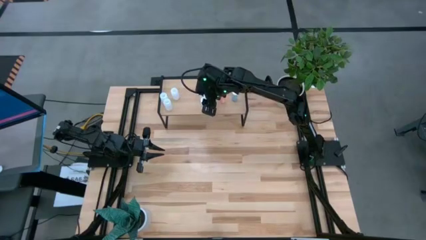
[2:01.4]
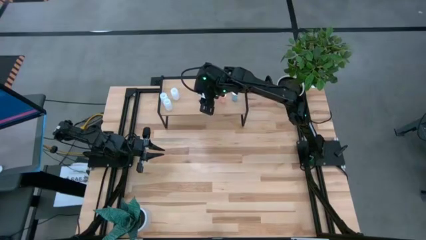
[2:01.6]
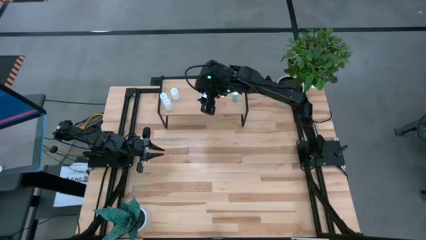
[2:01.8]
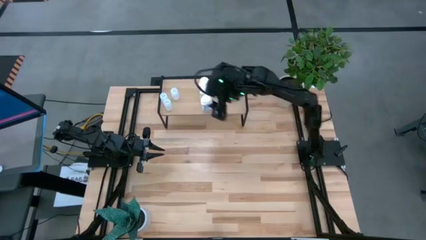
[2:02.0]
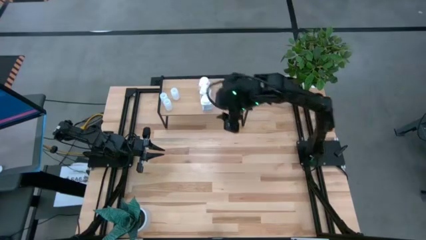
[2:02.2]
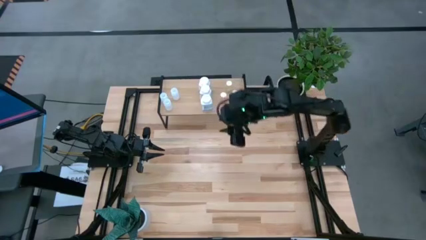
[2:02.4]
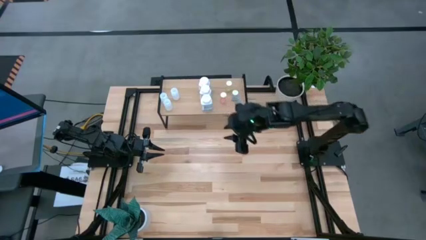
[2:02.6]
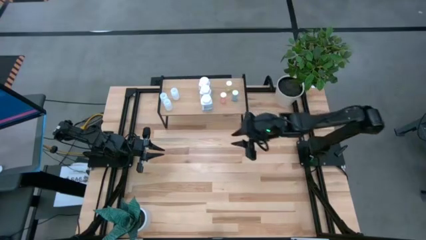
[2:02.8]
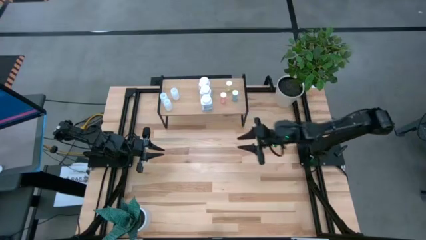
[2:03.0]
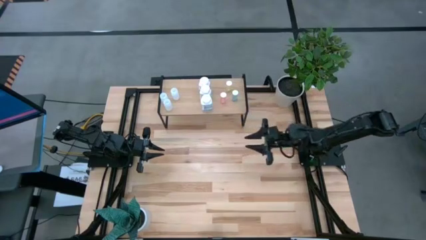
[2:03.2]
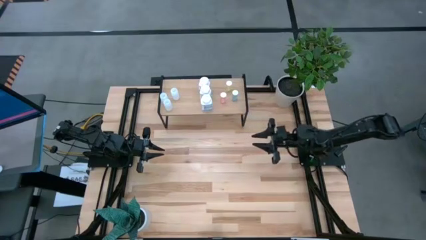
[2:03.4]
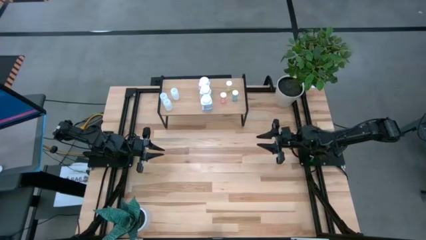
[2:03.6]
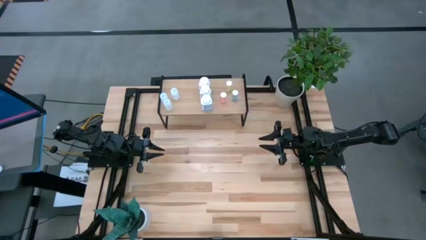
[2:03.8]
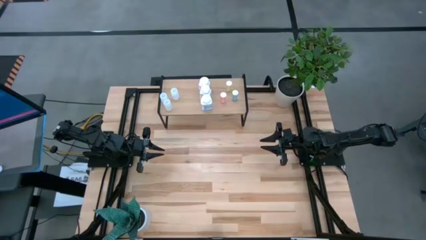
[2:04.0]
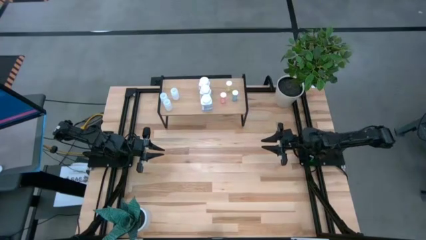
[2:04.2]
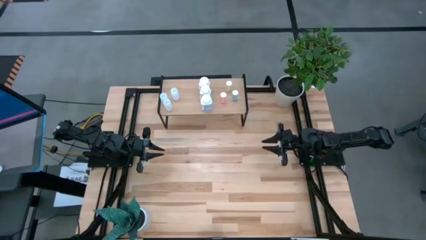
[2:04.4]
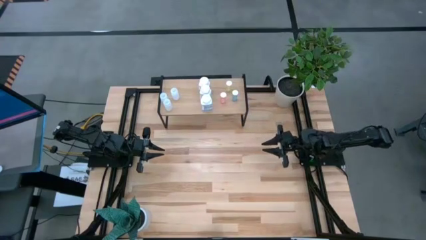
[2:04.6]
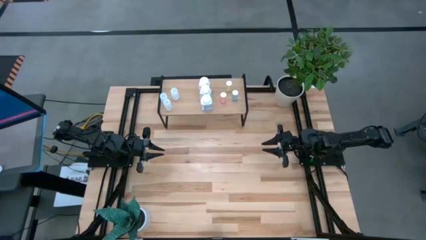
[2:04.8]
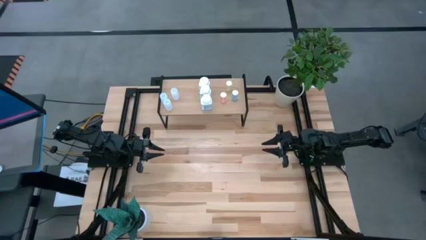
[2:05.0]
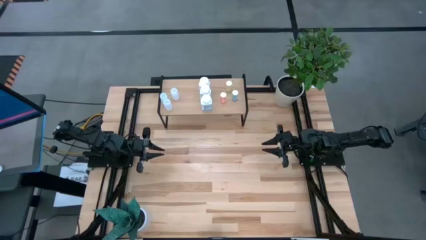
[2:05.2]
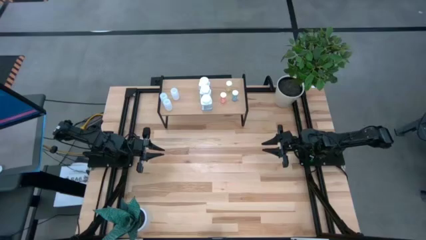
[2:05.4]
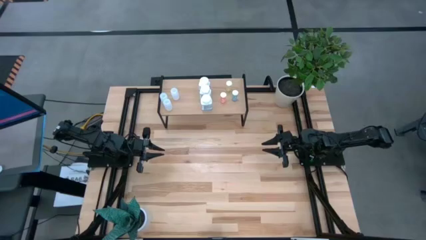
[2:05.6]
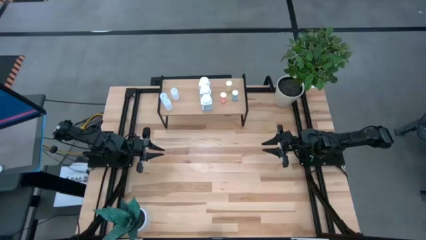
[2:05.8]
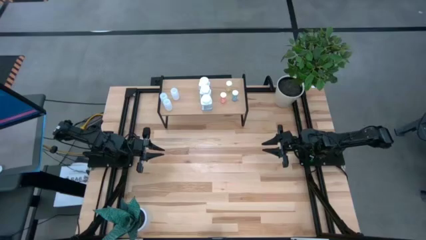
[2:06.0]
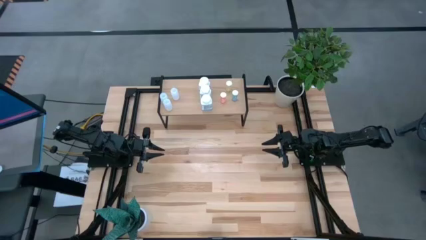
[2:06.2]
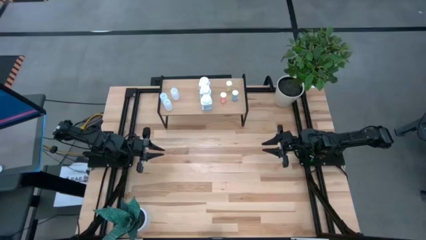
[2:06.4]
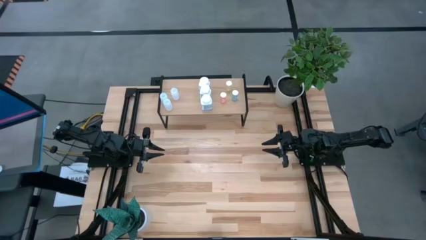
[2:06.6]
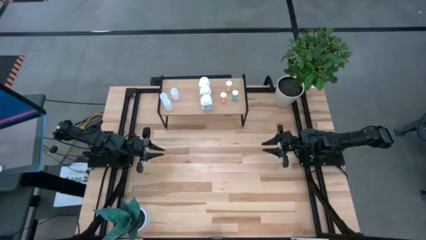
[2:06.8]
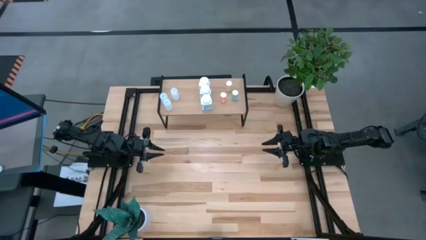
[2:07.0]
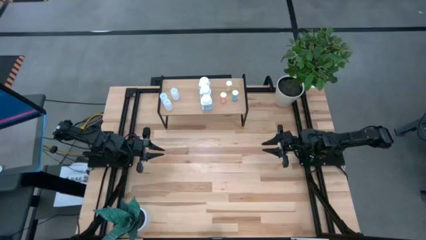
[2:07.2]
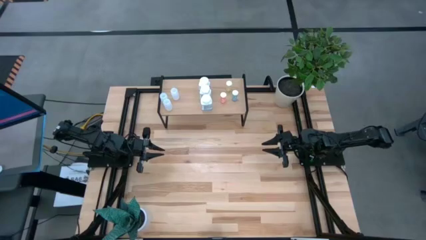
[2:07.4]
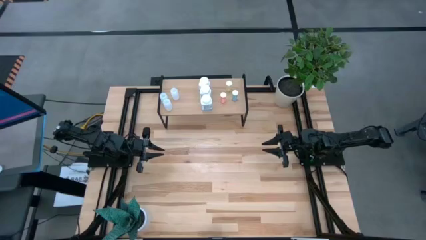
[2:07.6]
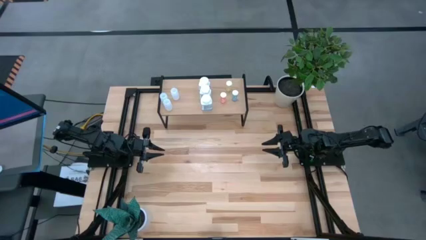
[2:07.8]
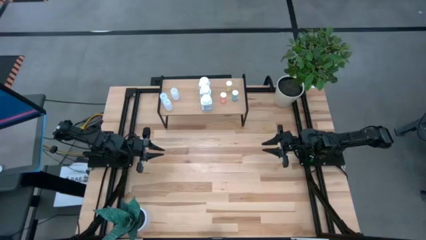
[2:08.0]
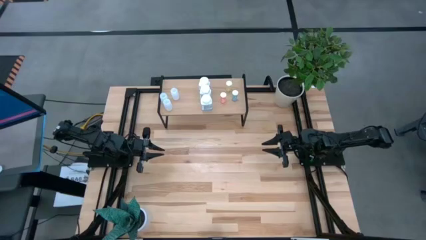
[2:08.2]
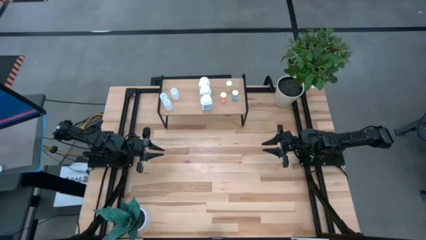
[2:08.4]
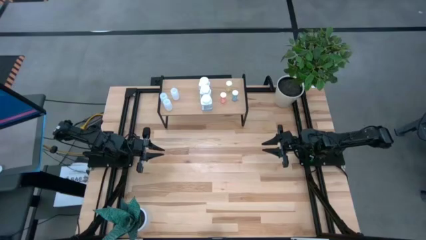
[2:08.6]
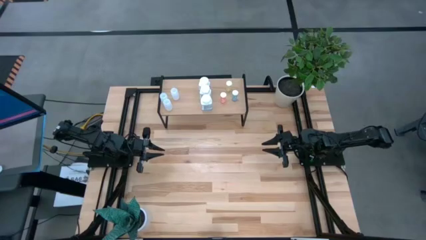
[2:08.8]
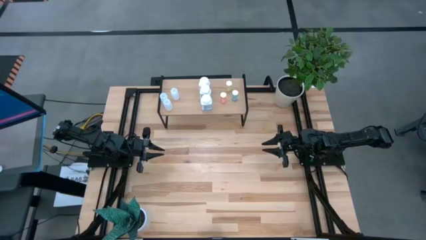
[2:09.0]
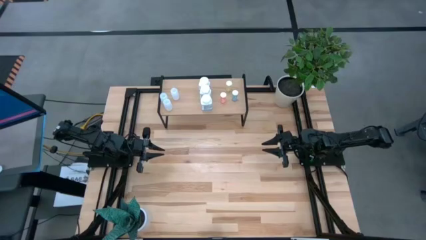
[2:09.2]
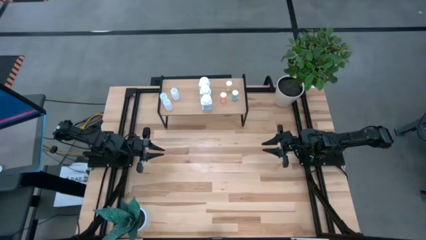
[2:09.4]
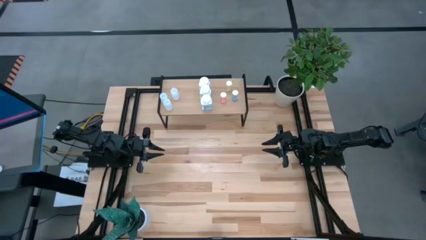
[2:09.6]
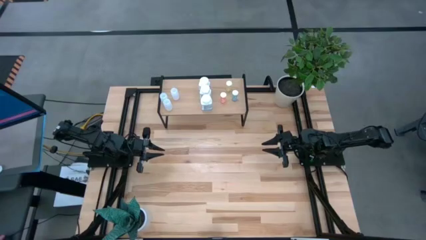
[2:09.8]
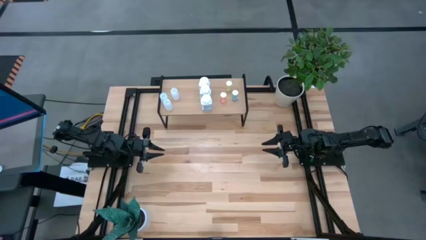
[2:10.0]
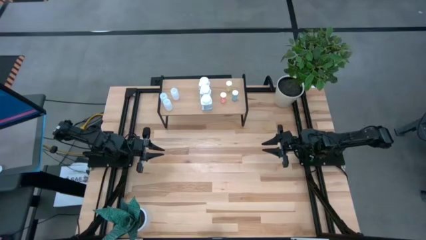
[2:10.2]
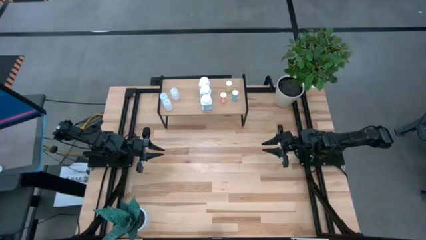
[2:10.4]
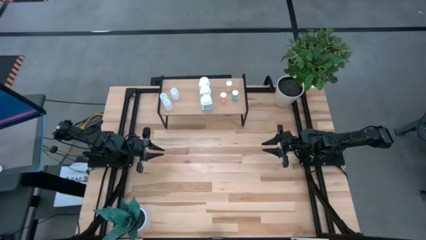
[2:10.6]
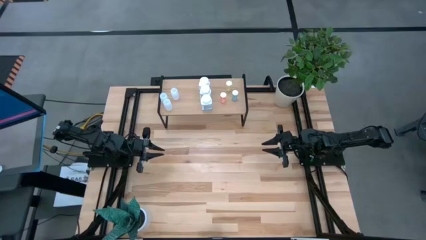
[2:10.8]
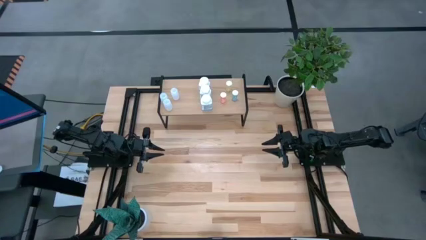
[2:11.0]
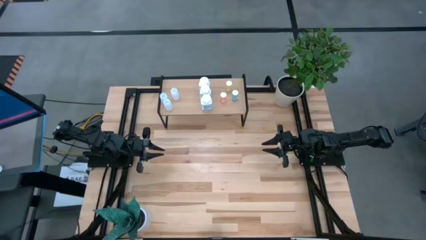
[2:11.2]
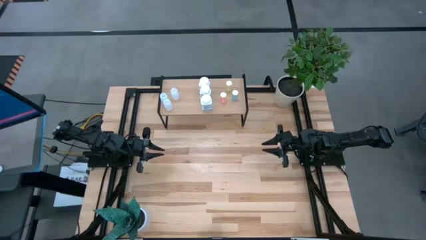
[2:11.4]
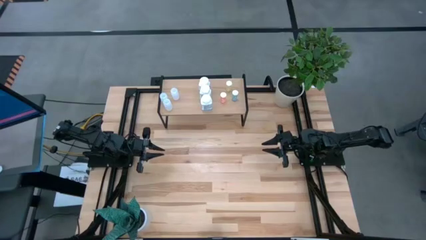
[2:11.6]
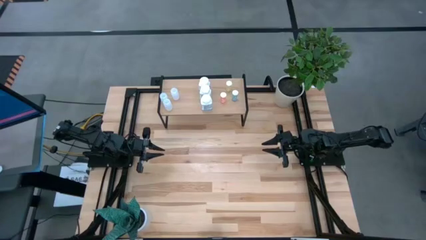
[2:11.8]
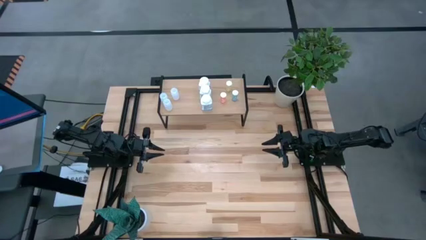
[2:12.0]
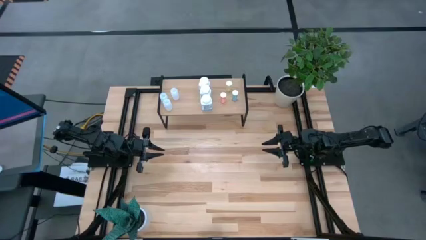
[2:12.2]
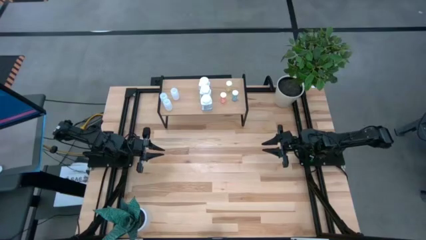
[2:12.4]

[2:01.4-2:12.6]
Task: Pick and place medicine bottles onto shelf by color
Return to Home Position

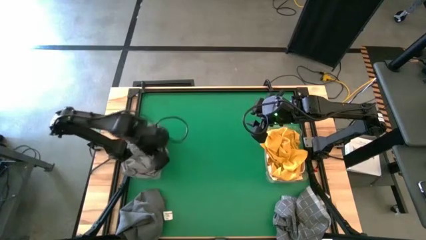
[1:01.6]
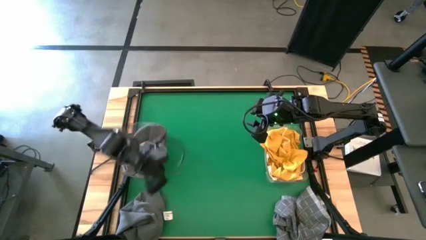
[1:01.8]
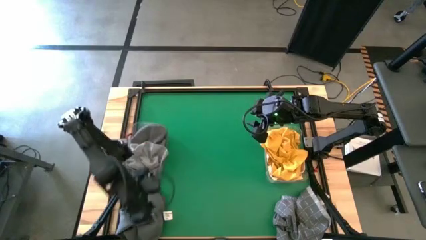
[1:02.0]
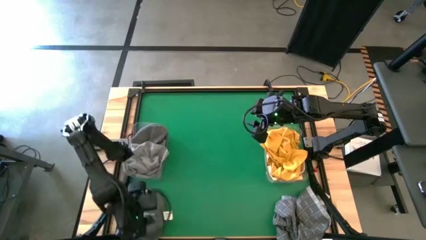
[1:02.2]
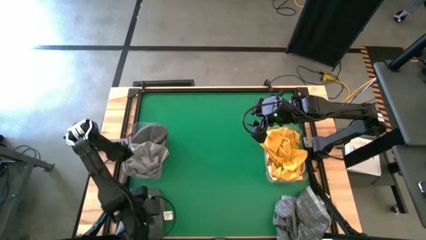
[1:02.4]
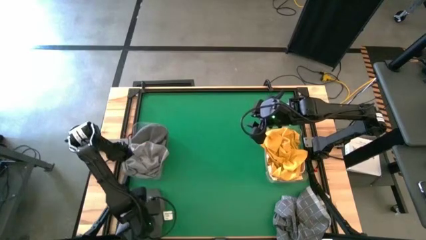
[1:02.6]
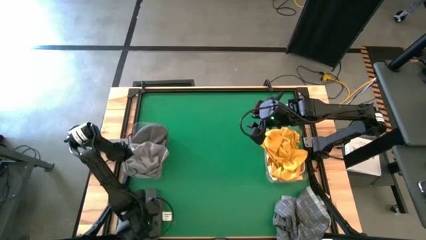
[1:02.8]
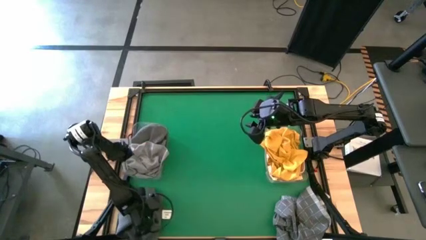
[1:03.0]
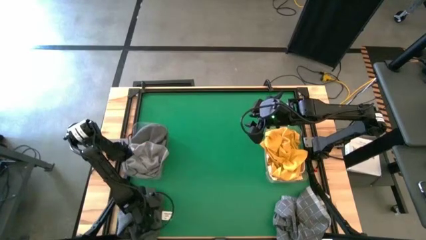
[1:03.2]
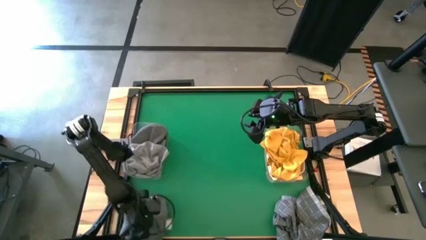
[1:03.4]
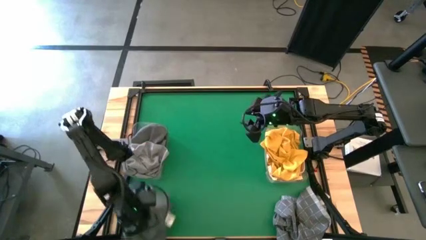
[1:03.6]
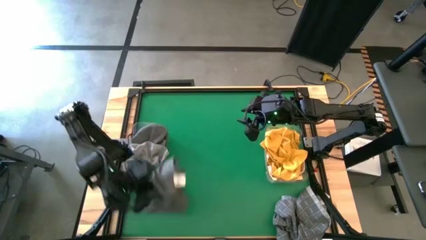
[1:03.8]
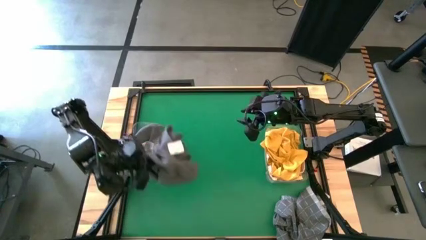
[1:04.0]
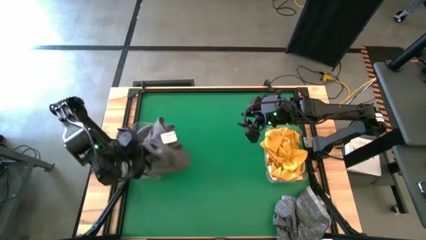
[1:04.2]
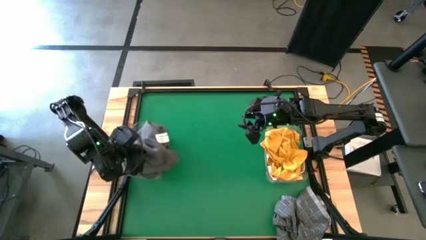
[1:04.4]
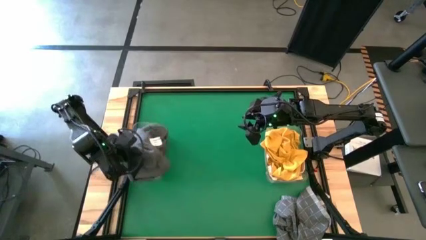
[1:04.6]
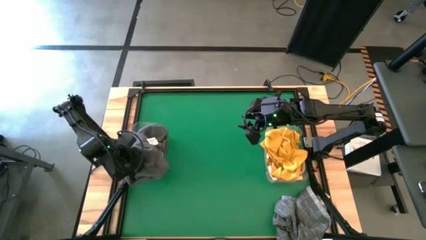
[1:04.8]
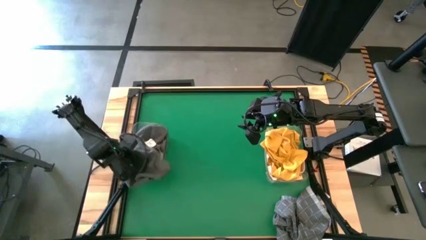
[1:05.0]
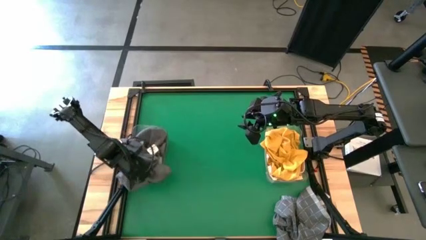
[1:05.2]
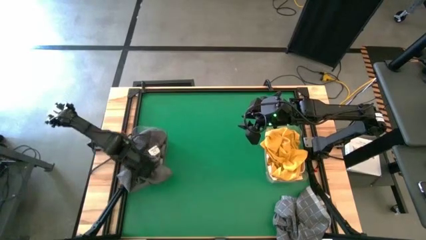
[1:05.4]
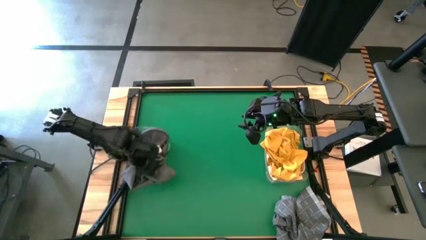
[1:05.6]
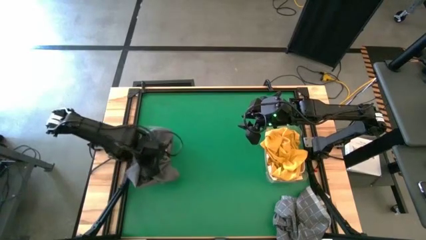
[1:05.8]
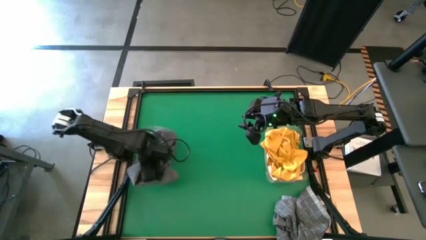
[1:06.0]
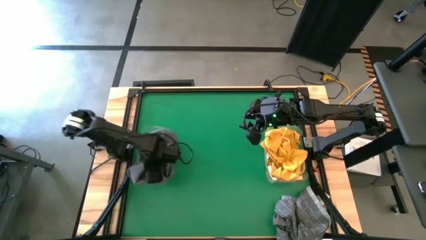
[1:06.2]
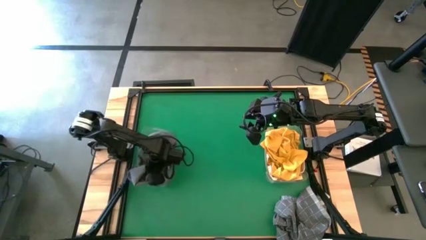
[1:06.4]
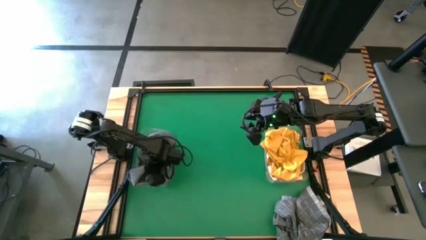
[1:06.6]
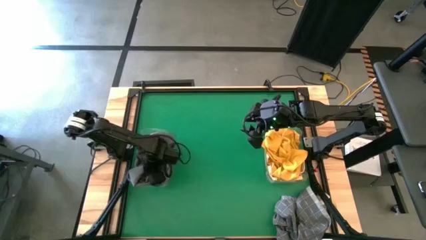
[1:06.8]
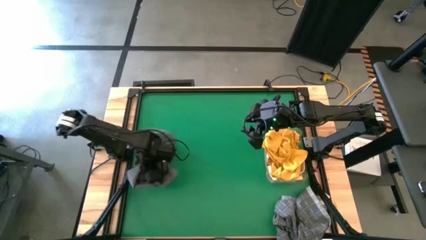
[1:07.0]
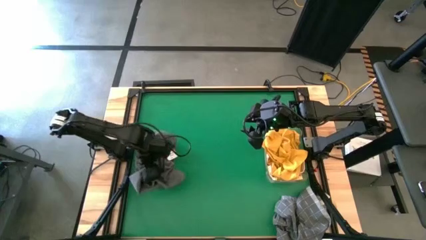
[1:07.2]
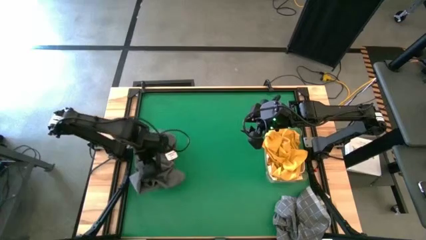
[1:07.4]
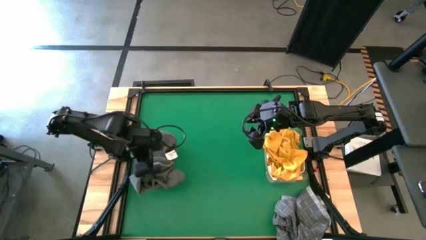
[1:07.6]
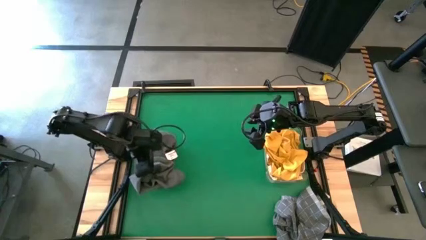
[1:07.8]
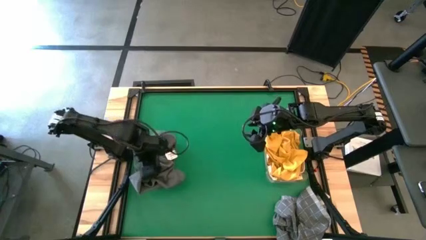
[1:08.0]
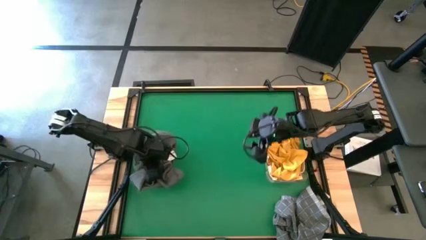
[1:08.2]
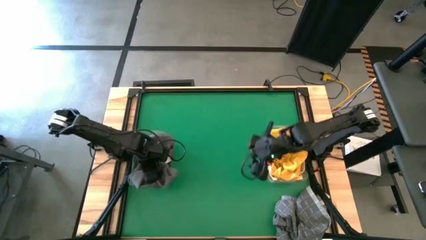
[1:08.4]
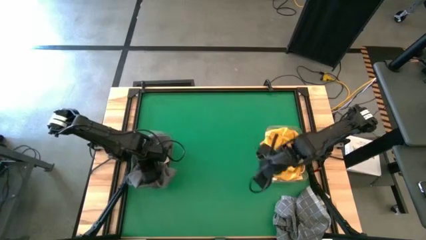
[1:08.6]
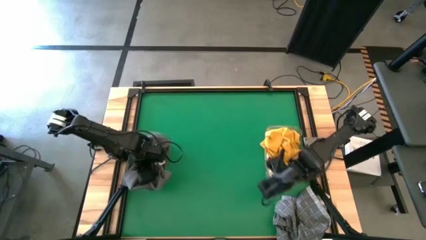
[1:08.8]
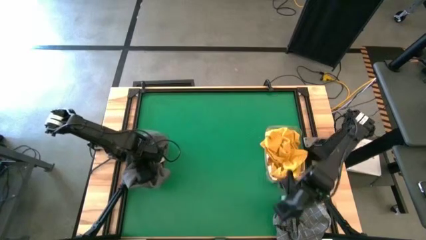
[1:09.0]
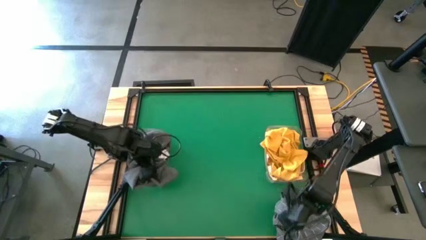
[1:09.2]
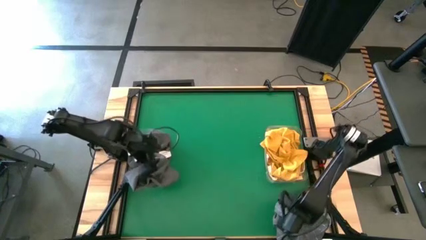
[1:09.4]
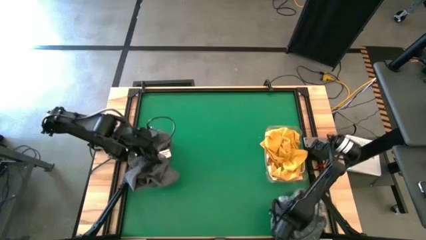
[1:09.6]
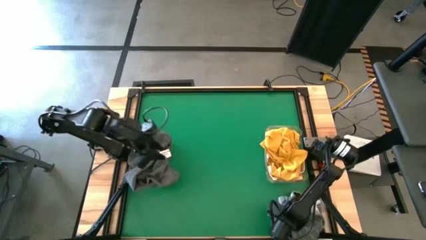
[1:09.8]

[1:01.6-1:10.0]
Task: Sort microfiber towel by color & place in baskets
Put the gray microfiber towel into the left transparent bin
